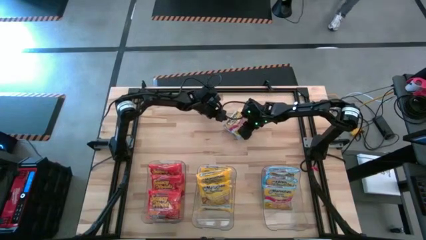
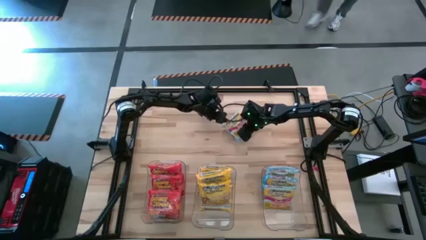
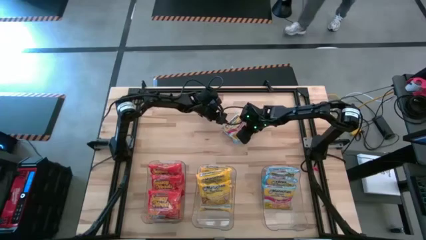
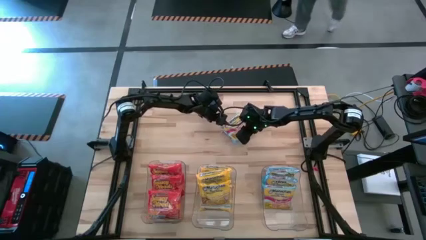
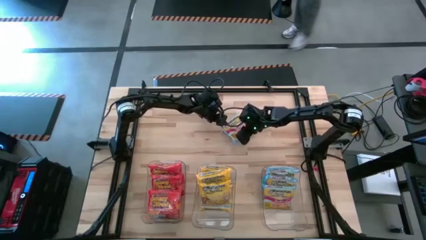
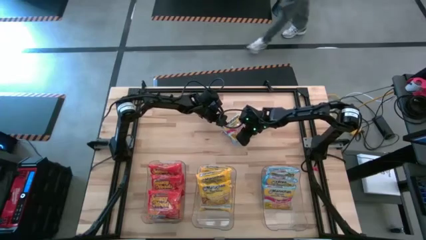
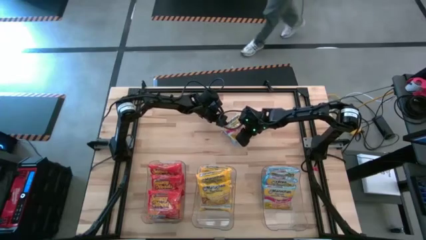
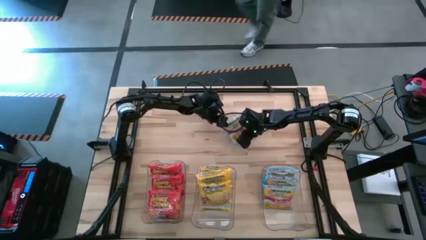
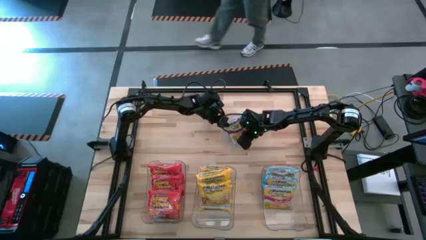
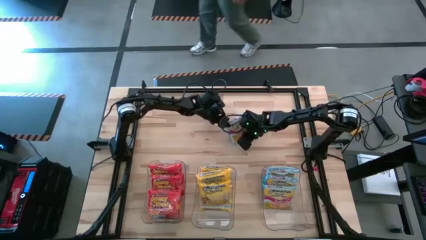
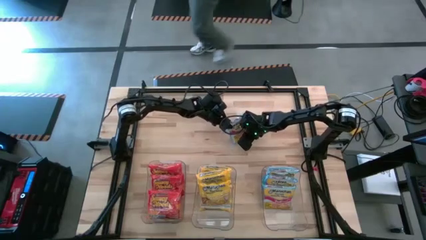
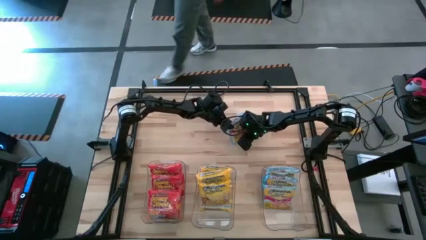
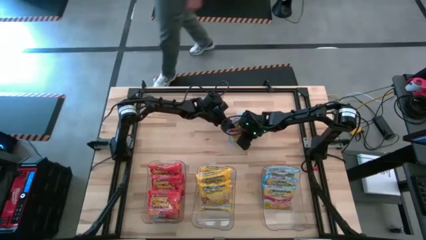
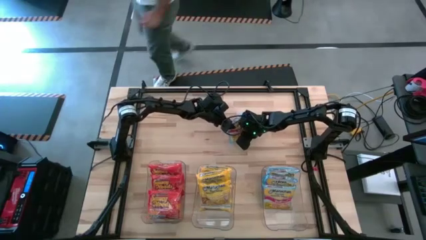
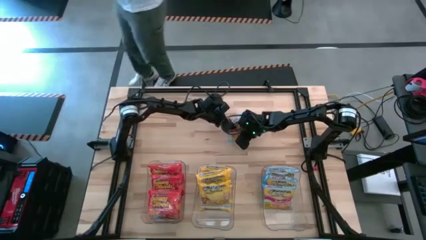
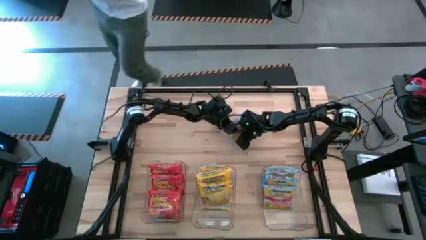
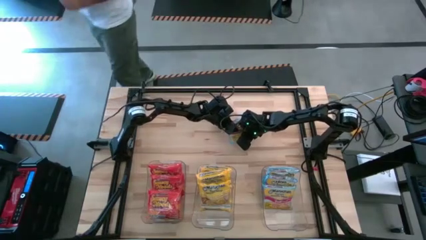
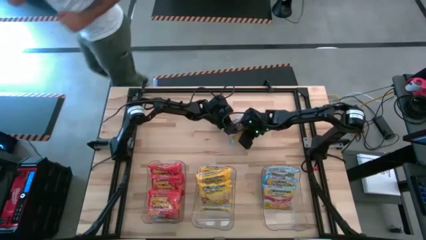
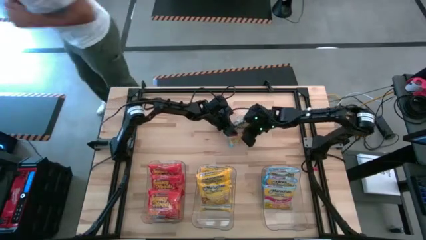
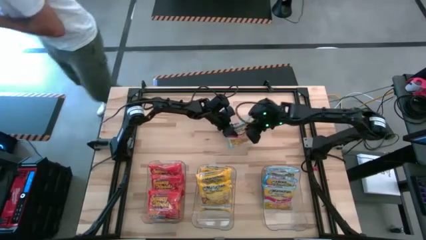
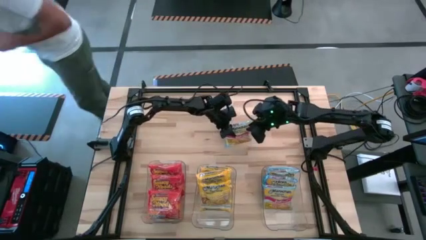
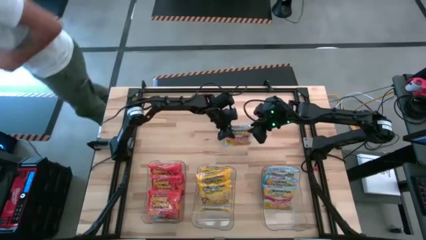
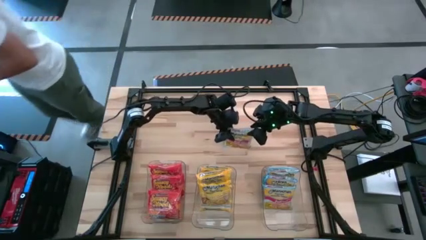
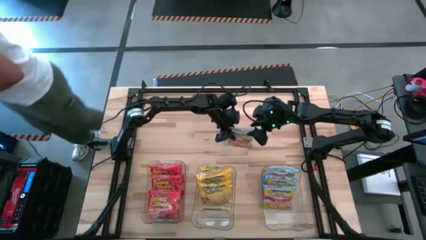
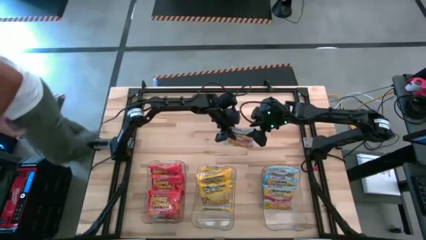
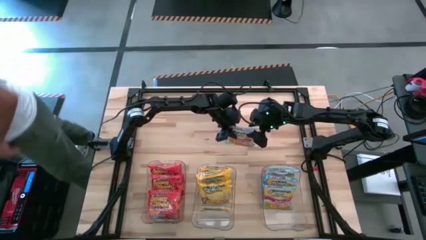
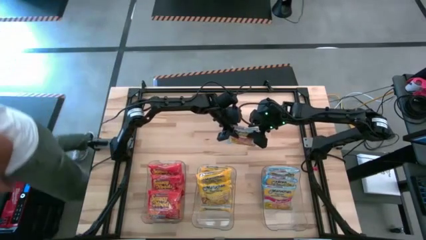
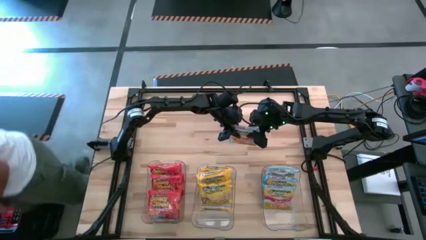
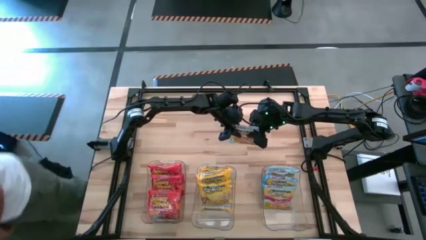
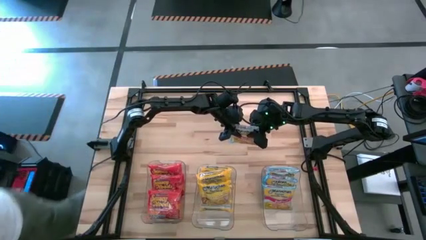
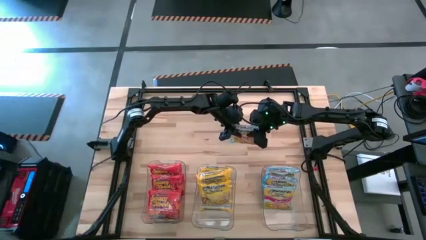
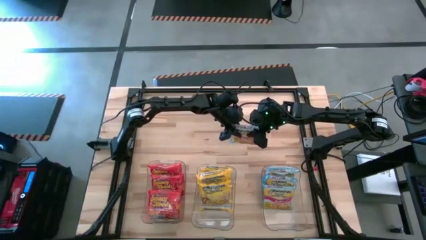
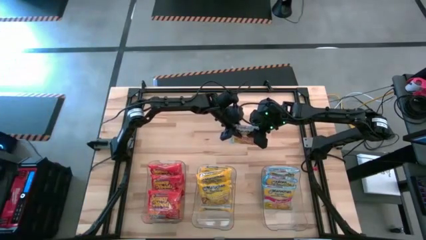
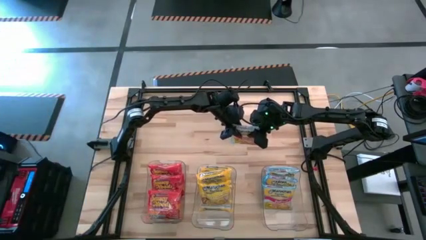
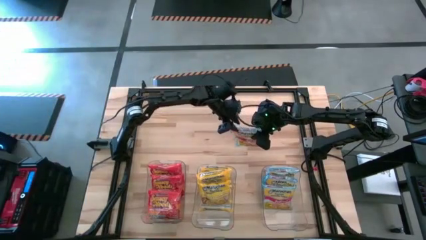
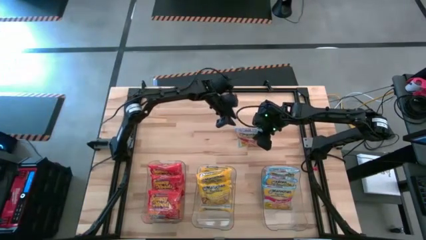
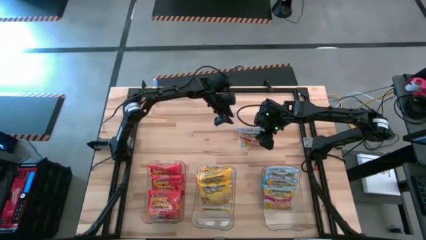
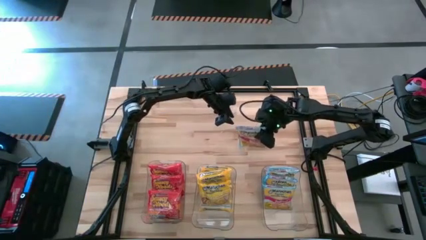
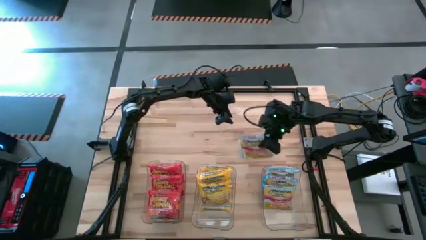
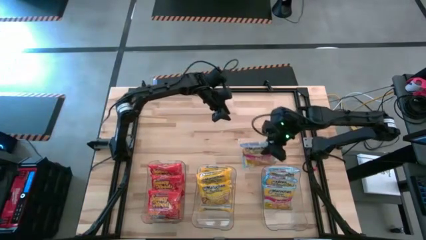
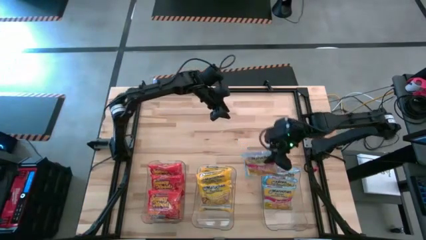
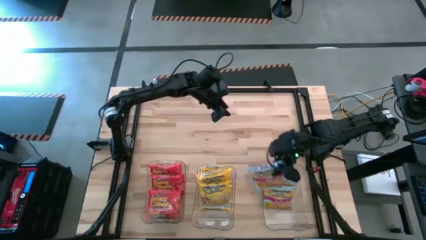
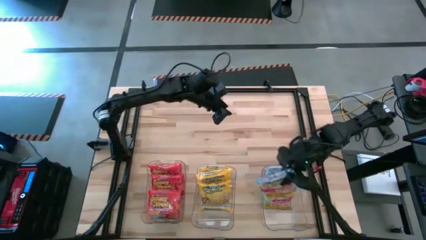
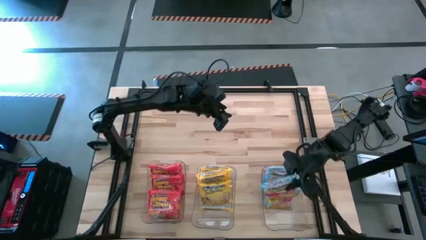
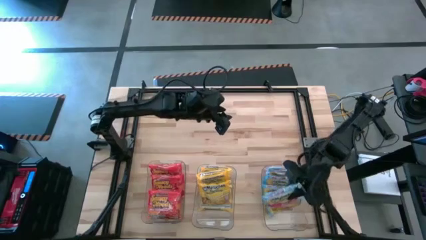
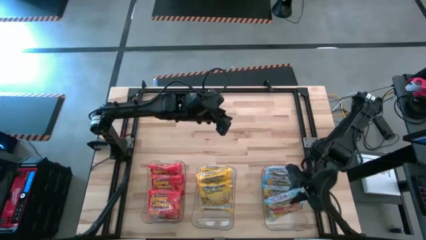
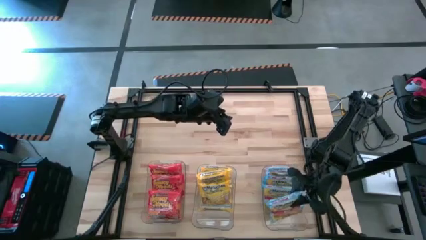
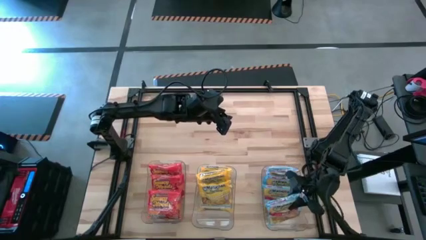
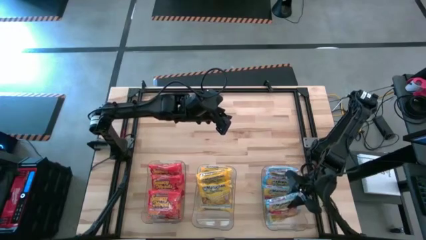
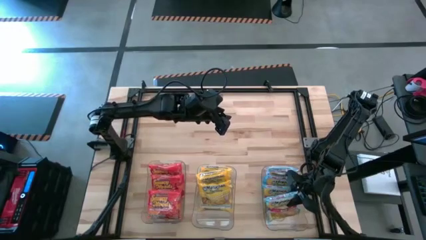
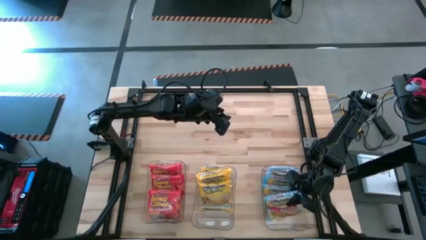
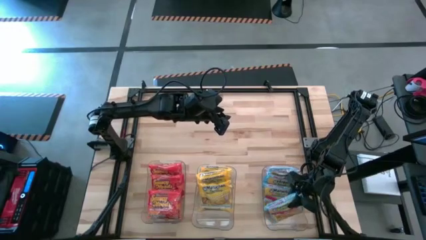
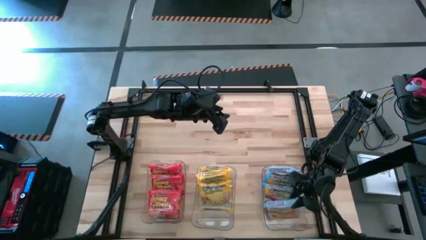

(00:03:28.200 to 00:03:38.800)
Task: Sort Maruchan noodles
Put the blue noodle pack into the right transparent bin

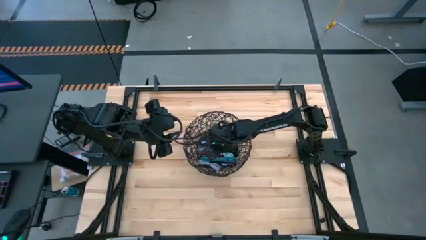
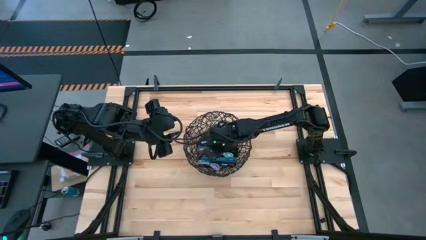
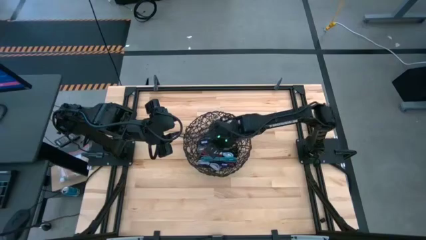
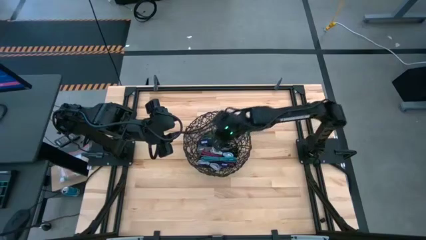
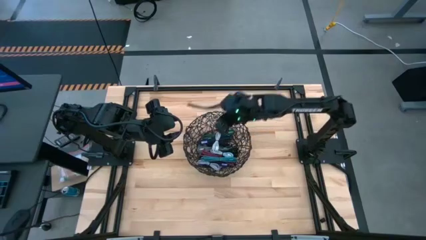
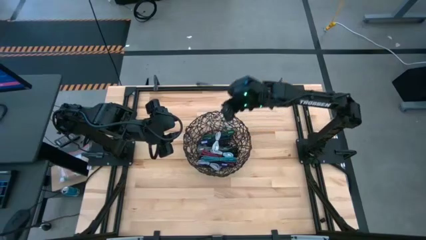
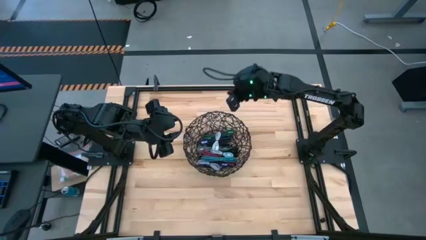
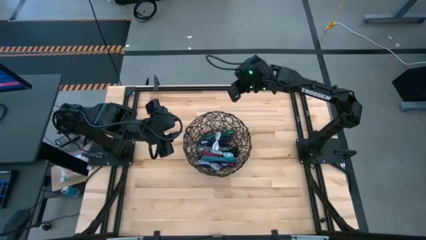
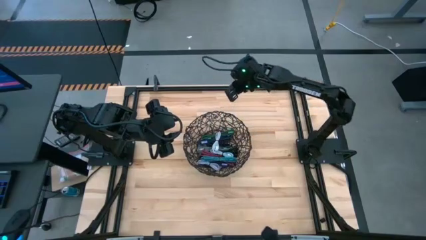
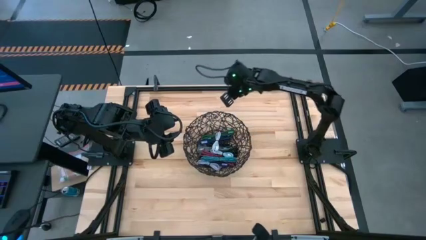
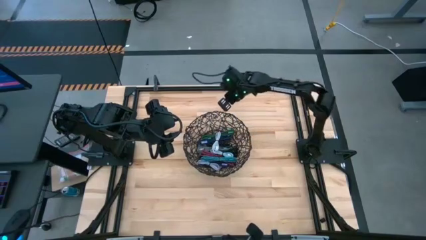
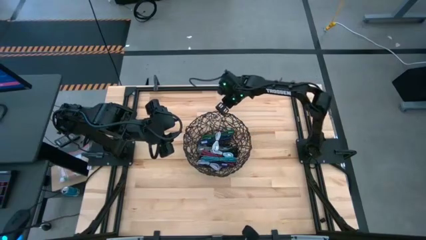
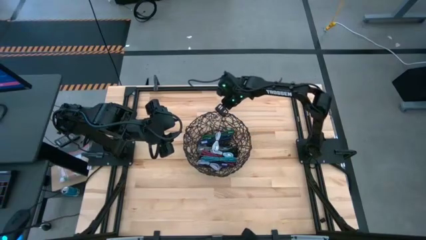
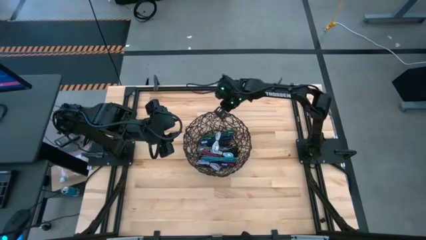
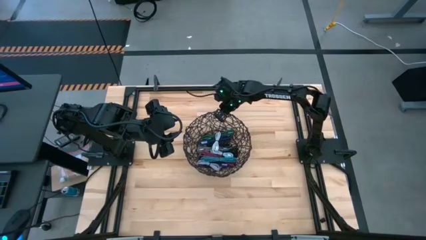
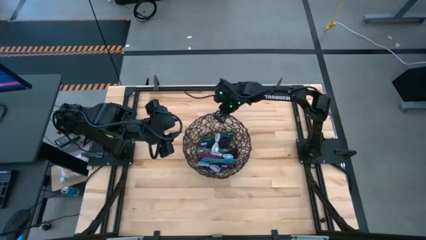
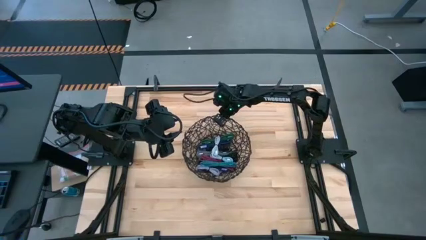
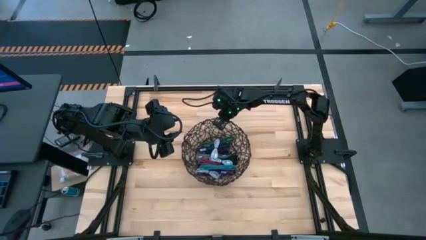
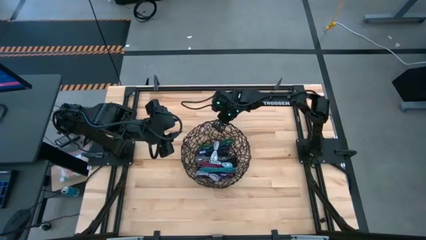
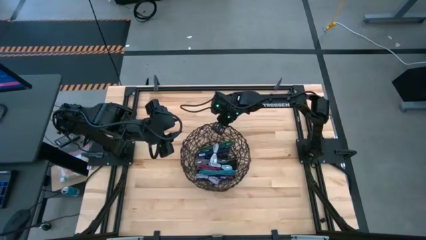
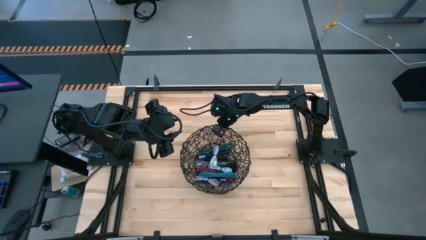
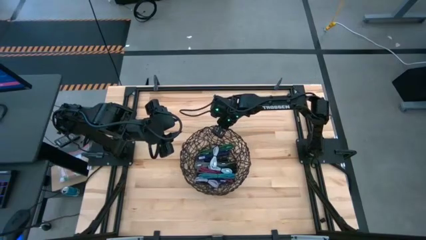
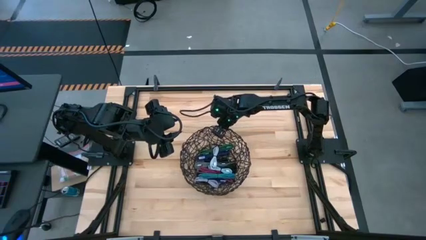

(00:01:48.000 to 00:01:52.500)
Task: Pick and place USB-C Cables
Adjust the black mesh basket
